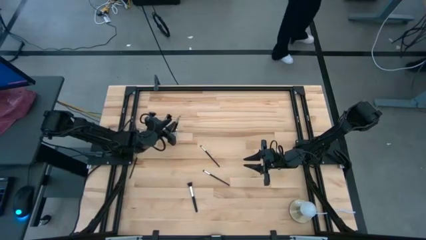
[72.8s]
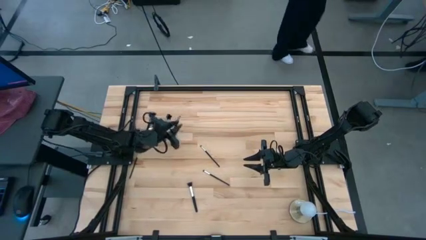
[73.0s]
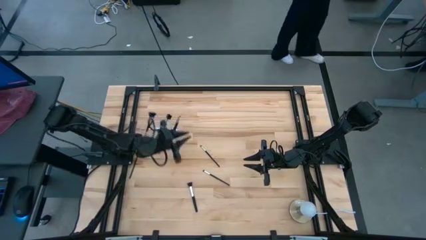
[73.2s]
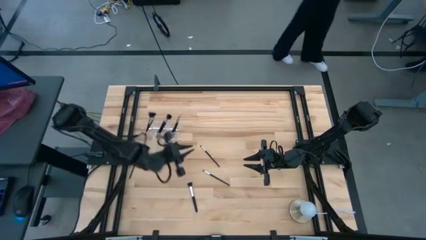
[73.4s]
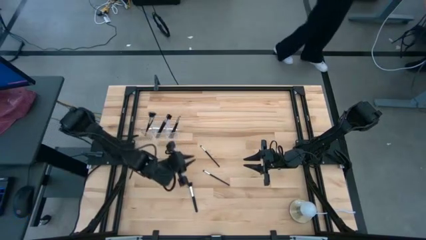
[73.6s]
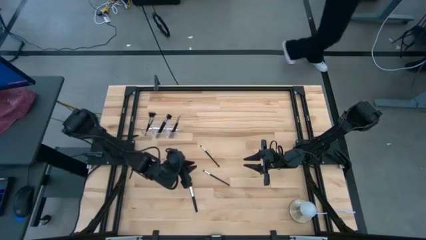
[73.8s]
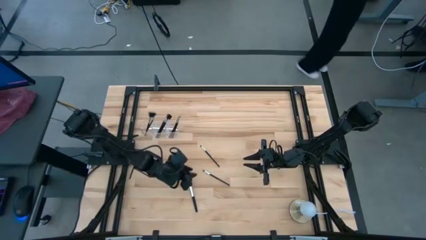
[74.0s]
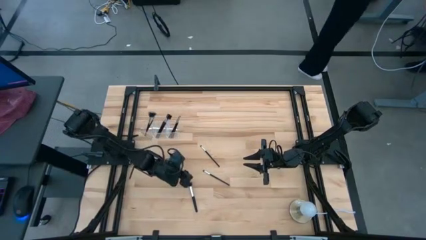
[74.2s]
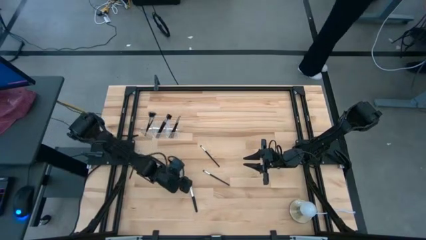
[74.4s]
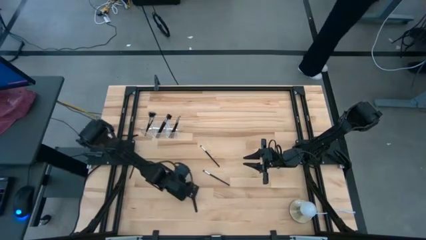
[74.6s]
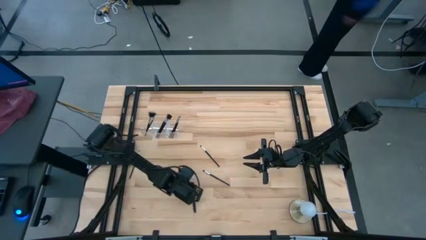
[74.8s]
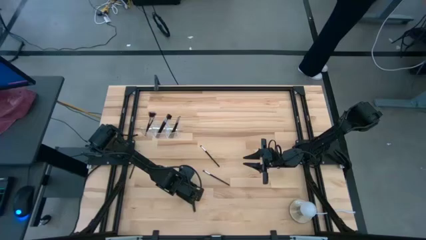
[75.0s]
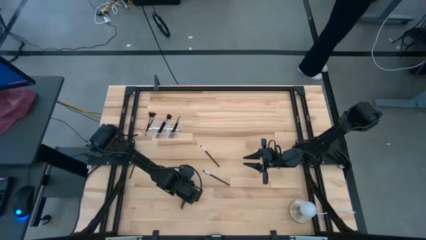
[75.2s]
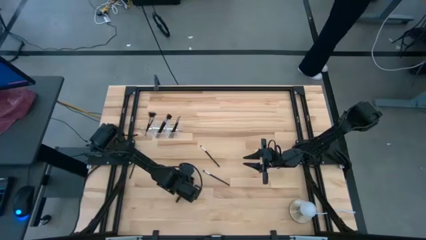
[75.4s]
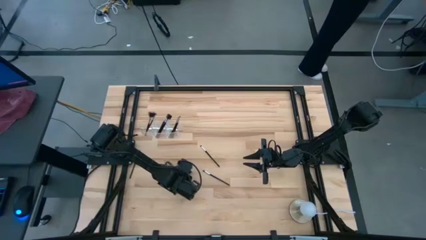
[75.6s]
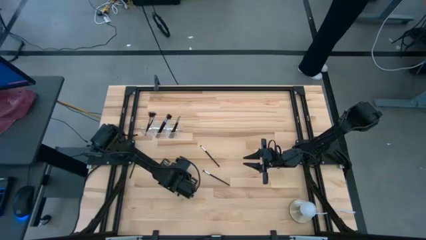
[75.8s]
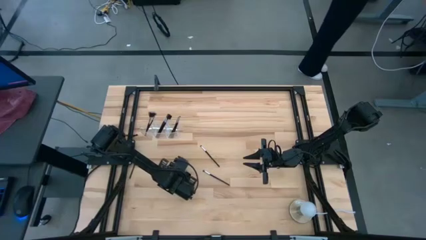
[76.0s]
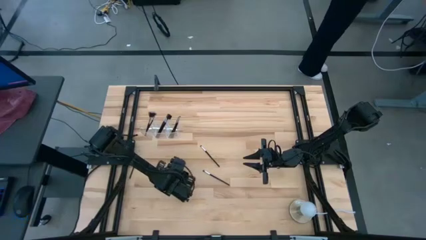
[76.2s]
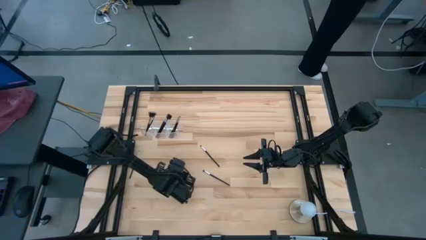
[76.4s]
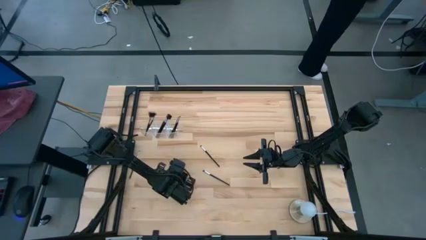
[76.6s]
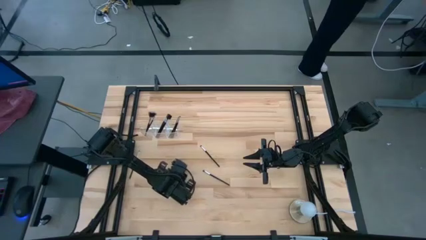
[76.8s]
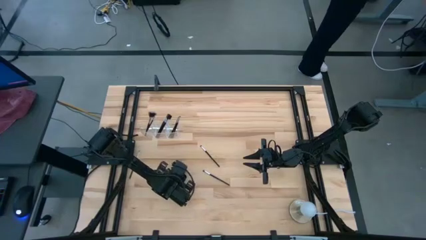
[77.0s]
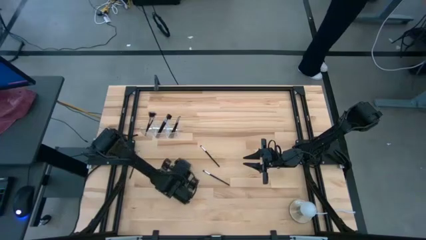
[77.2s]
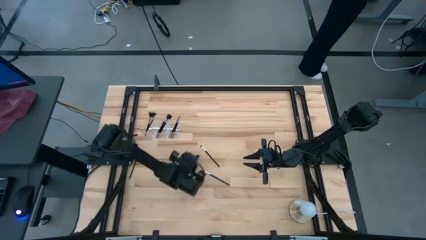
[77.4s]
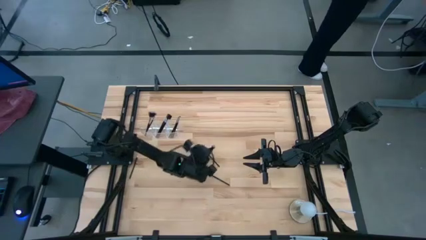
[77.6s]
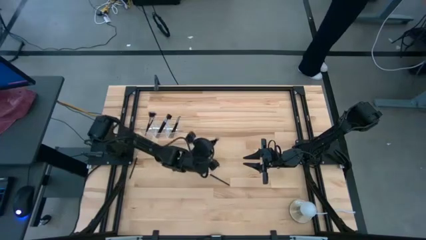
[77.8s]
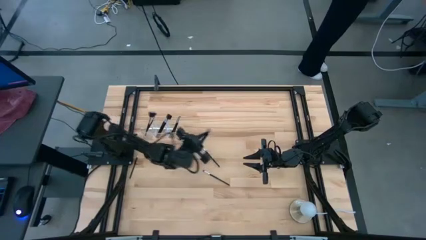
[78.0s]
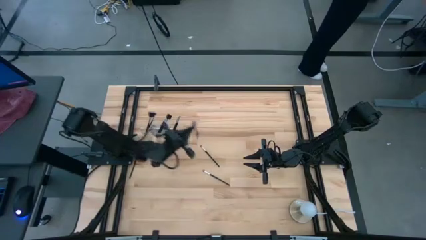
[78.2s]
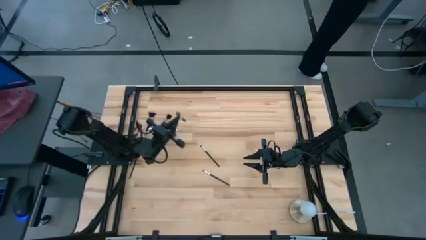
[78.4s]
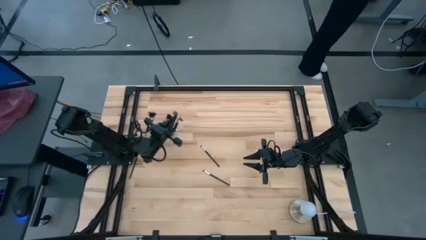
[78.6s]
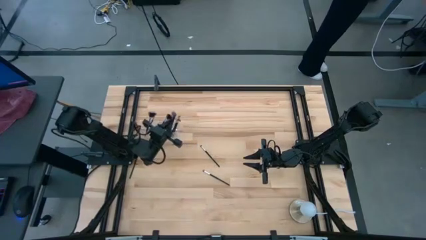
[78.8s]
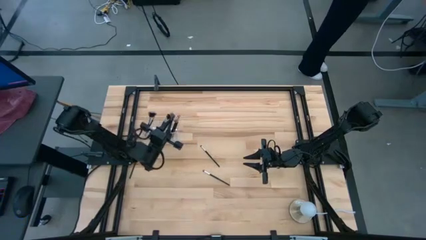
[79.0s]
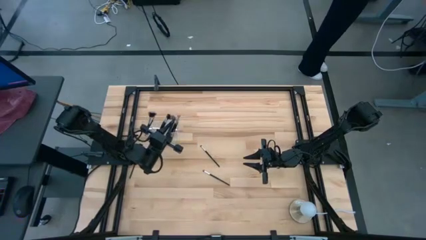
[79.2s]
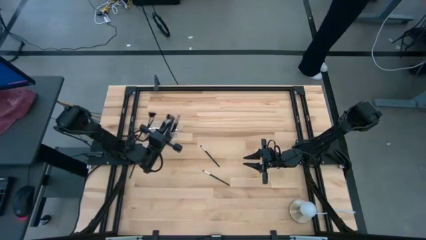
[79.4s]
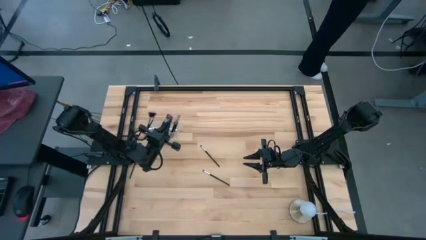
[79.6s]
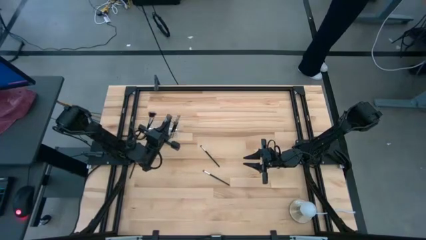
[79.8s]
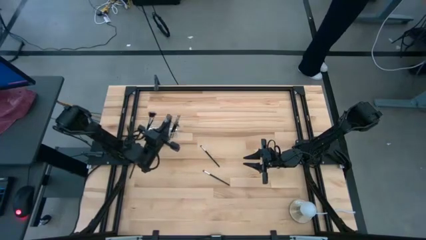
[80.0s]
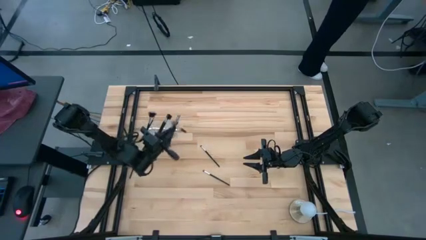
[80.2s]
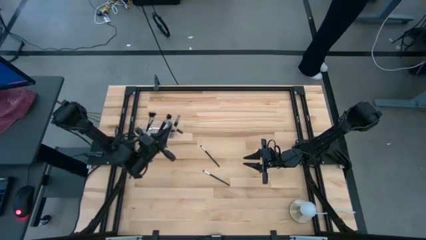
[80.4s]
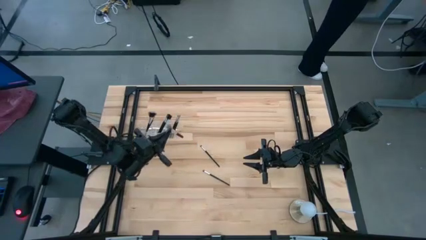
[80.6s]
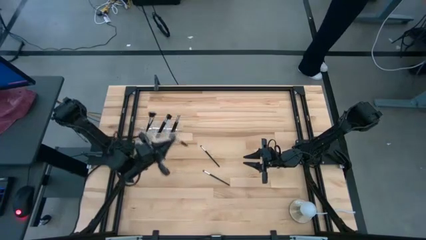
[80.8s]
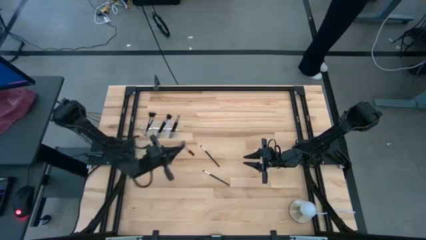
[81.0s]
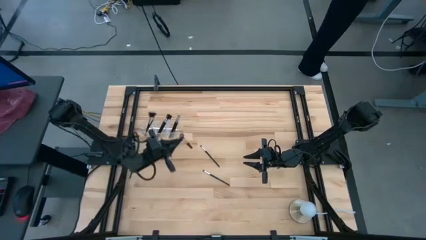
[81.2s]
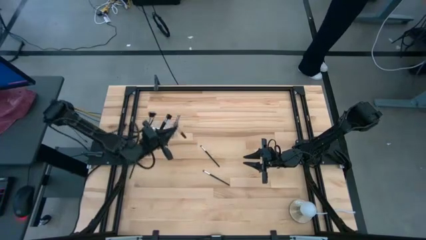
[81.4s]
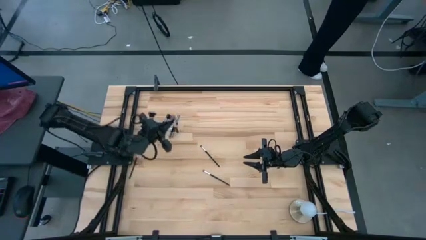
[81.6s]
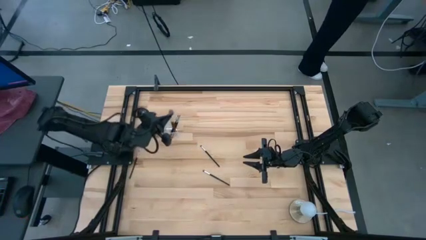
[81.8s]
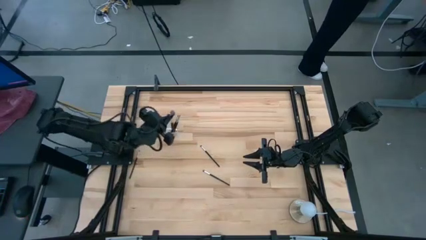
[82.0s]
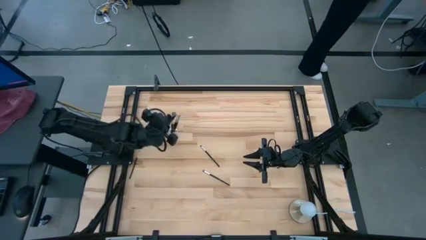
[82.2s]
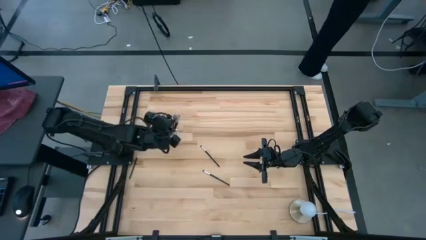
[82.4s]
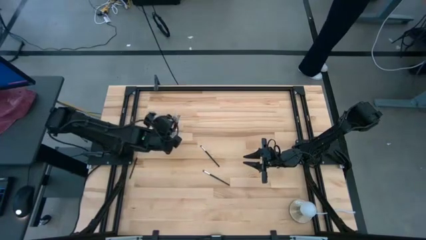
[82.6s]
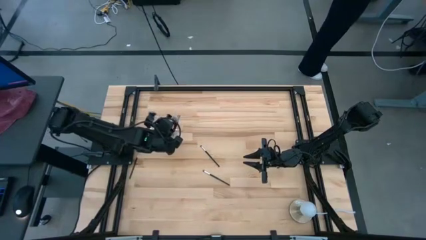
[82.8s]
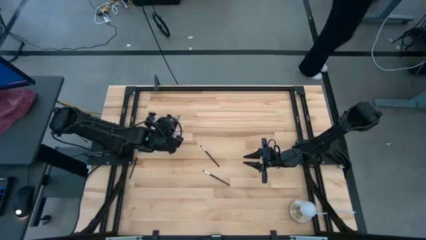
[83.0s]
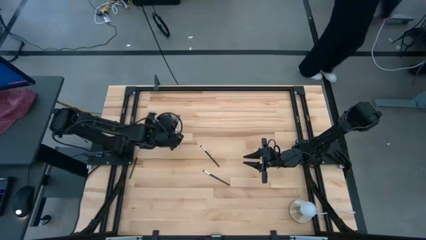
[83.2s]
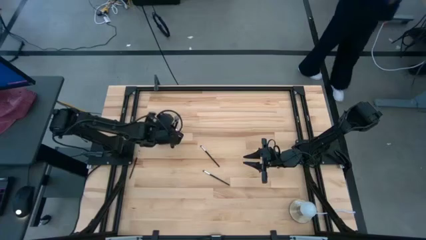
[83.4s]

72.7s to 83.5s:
Task: Put items in baskets/containers
Put the powder brush into the transparent organizer
